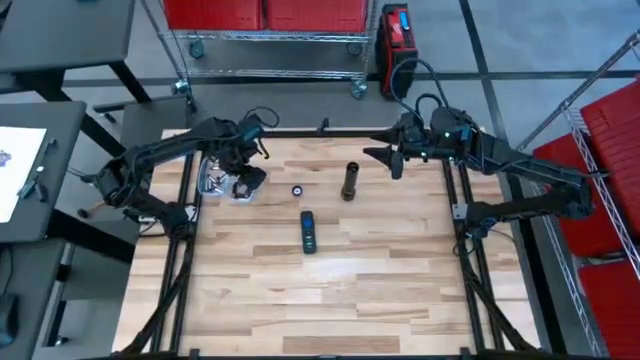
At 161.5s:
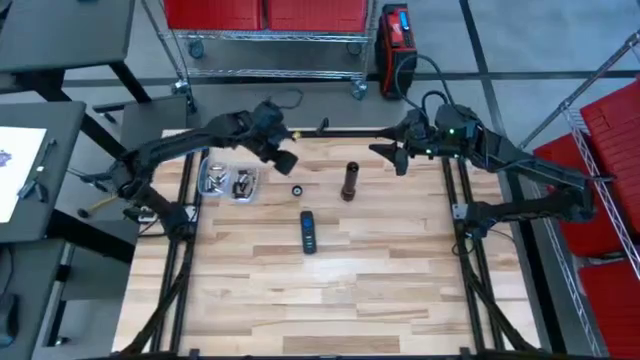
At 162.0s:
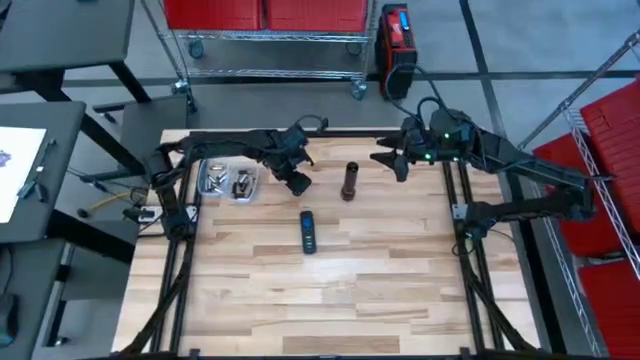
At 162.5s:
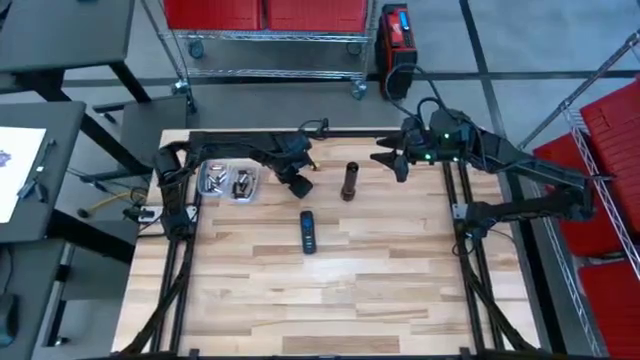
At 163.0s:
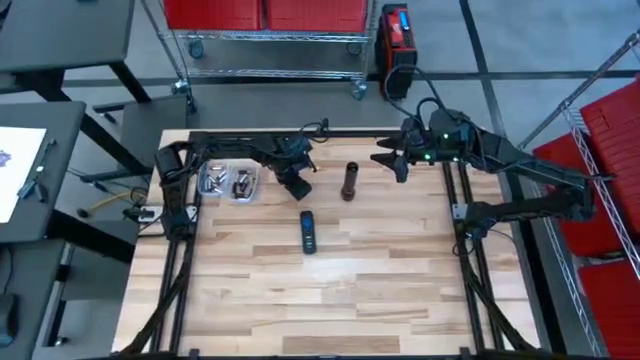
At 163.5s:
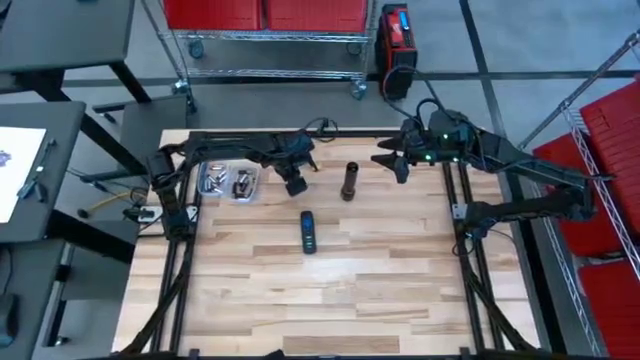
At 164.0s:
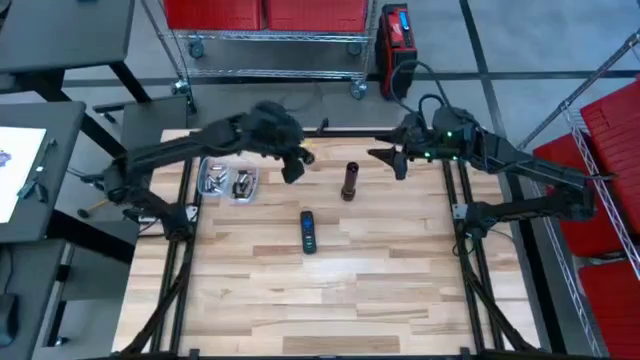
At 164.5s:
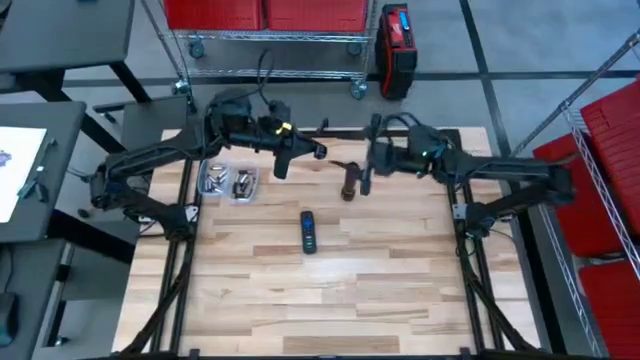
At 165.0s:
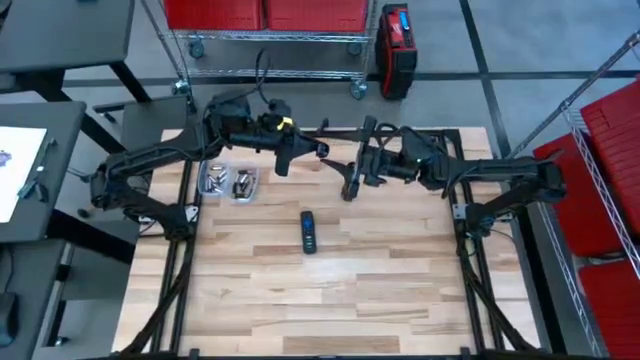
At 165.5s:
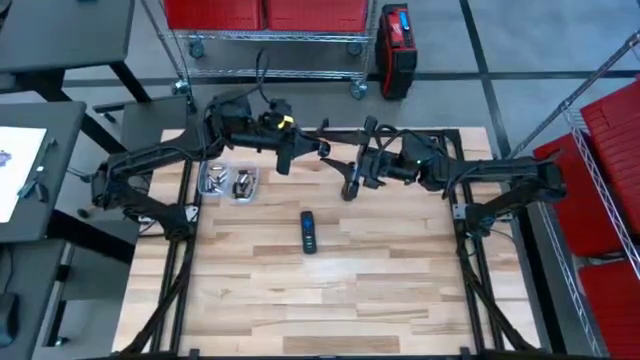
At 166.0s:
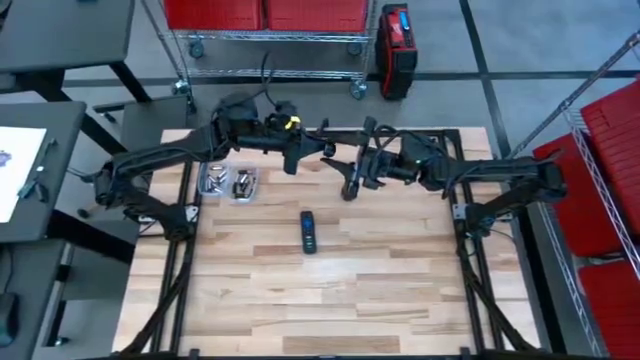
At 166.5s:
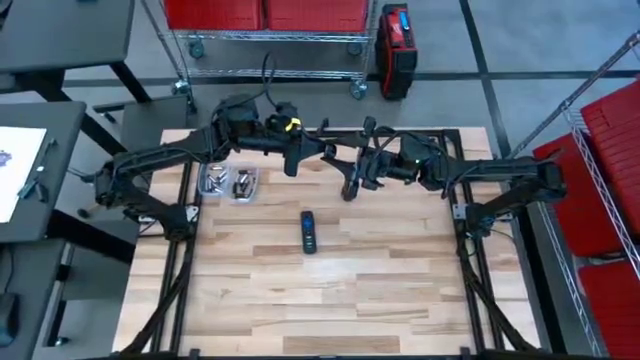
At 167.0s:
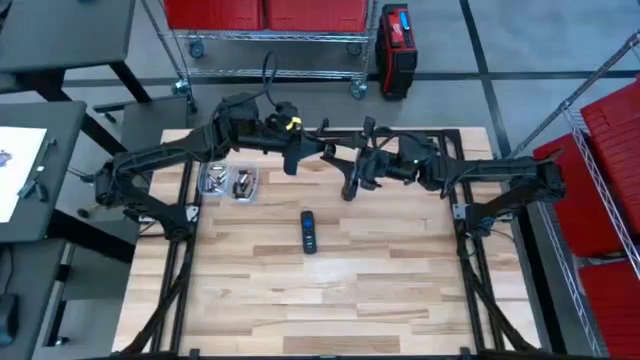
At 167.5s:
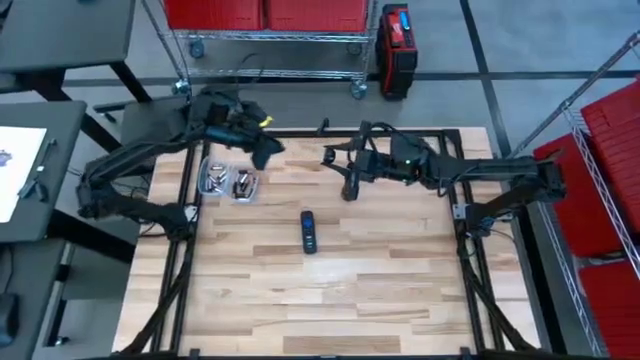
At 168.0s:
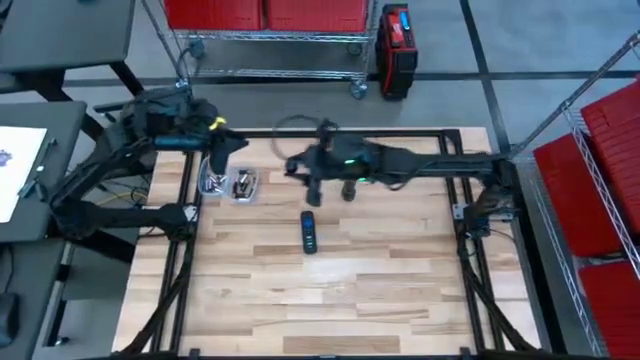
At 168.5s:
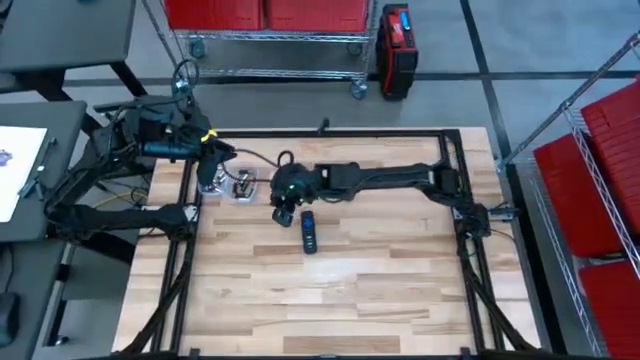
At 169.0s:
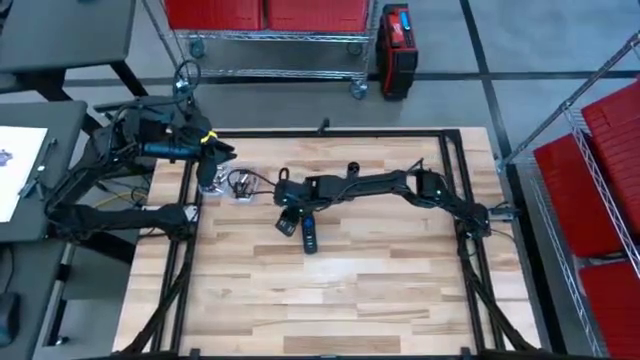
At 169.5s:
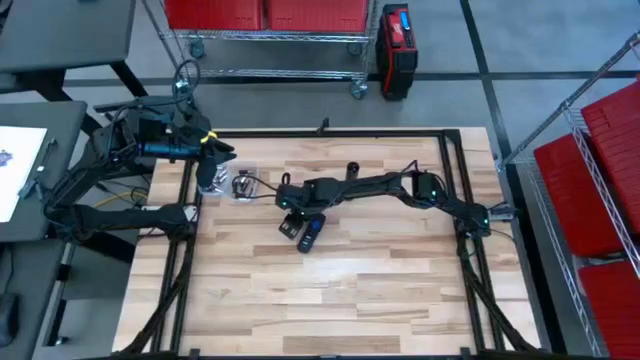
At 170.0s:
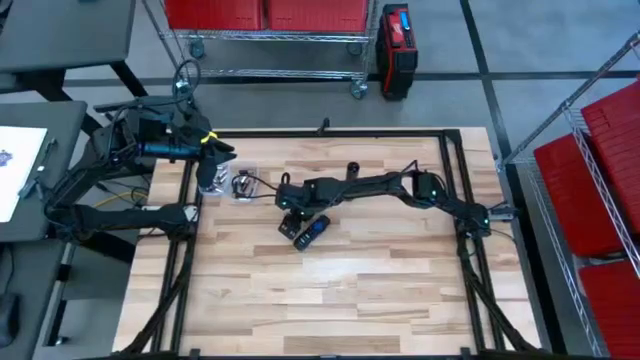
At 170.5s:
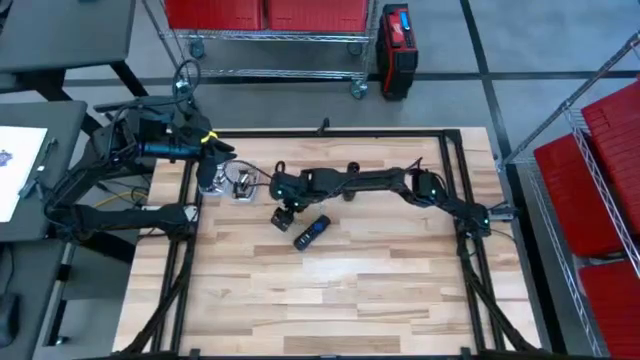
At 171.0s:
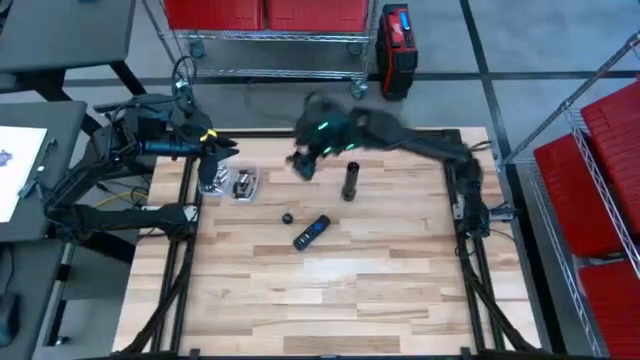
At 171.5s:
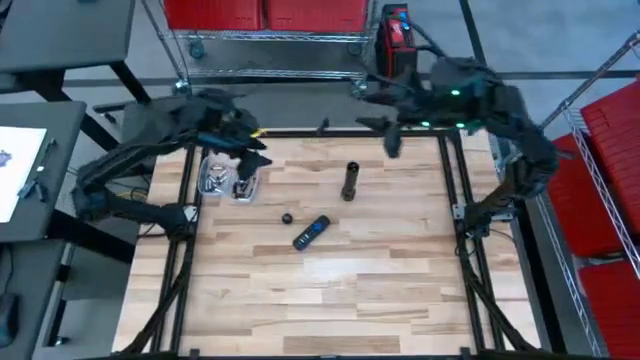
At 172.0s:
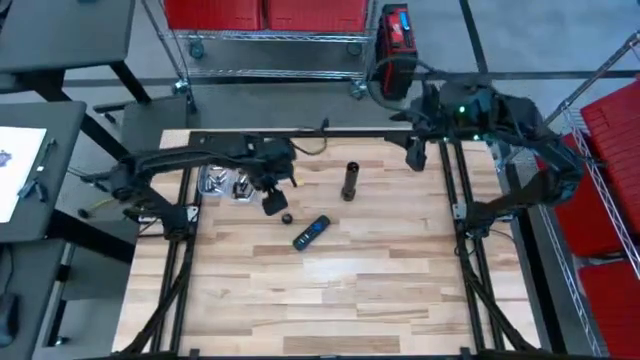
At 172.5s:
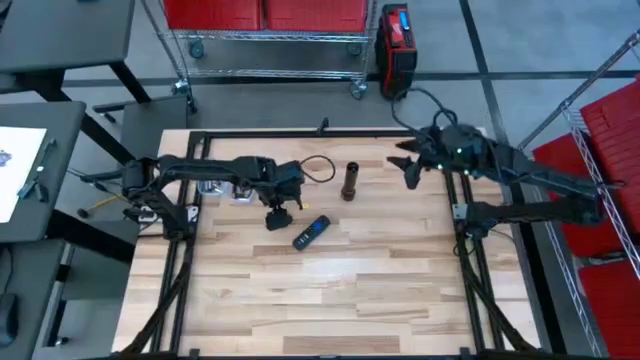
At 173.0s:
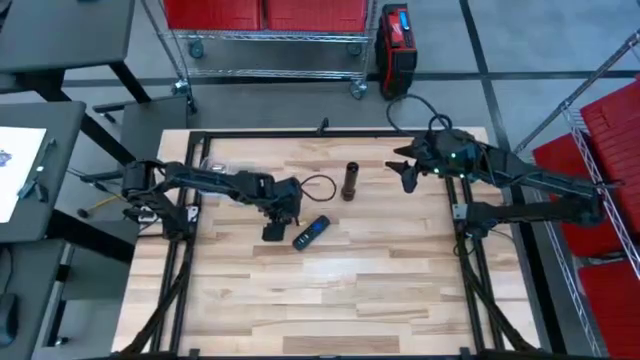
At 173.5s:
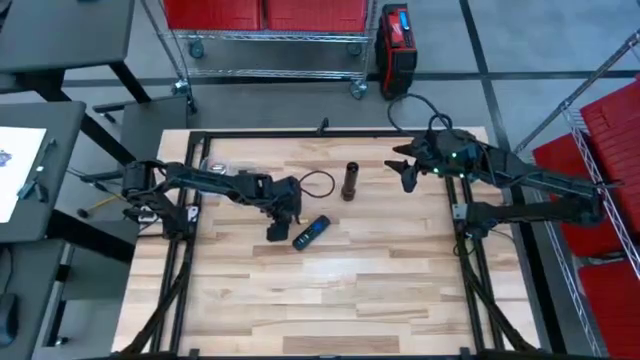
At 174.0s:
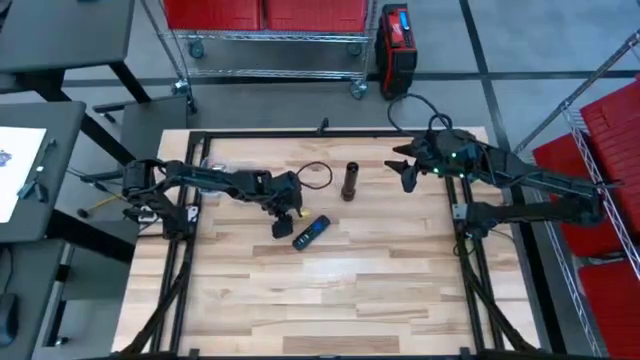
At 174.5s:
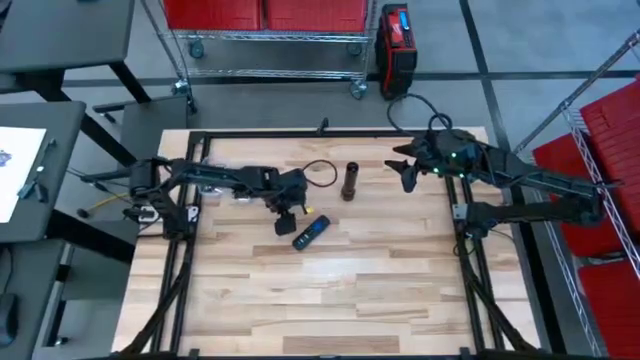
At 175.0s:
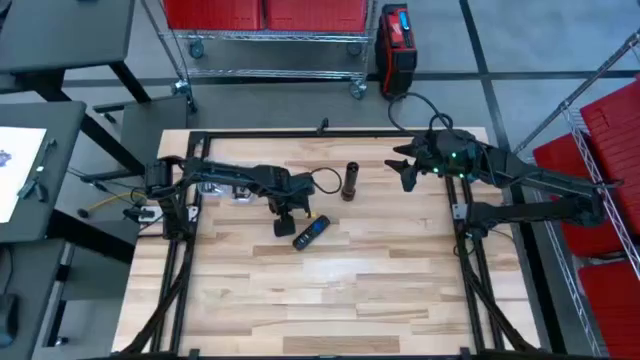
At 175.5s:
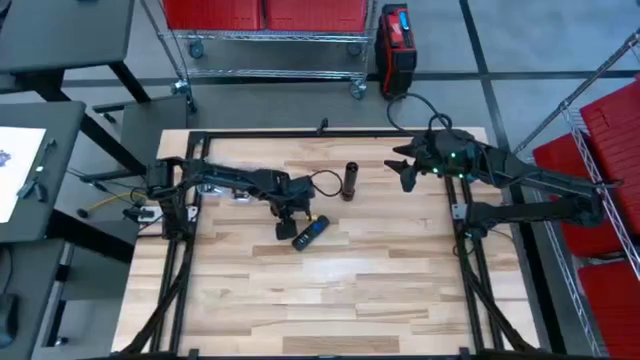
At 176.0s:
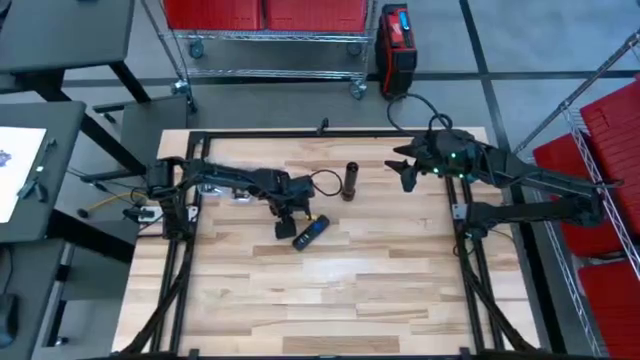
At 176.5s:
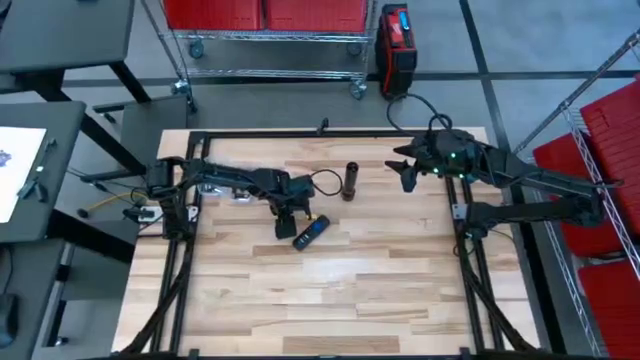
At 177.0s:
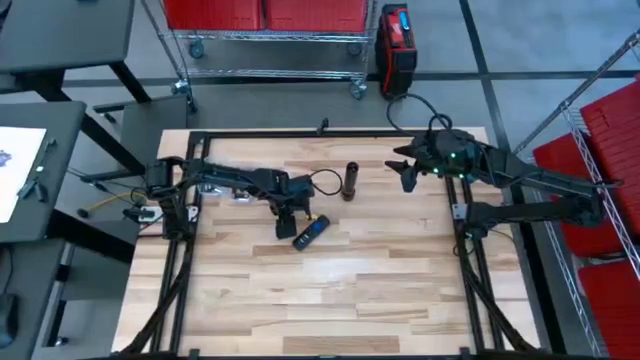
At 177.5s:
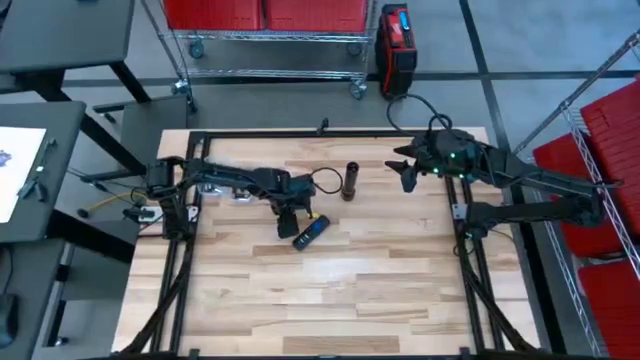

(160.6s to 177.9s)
Task: Insert battery
Close the flashlight's battery compartment

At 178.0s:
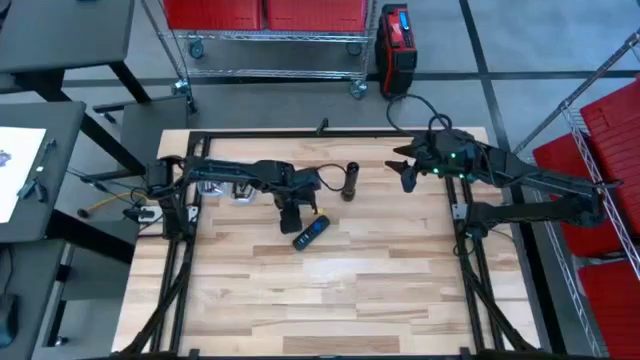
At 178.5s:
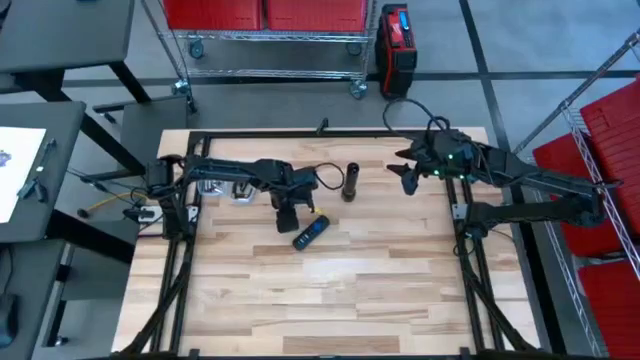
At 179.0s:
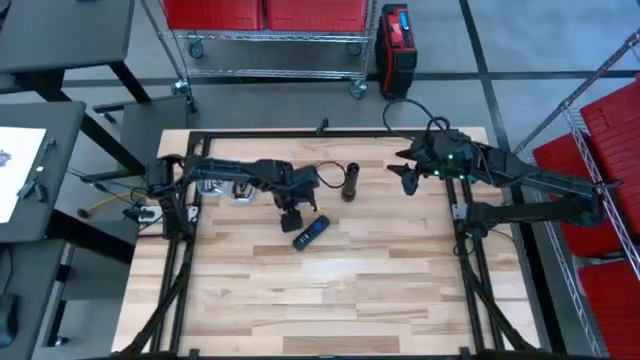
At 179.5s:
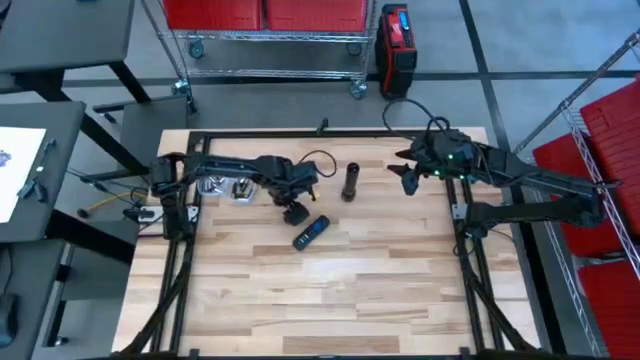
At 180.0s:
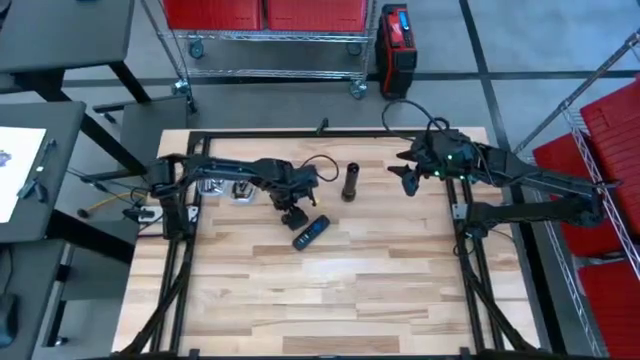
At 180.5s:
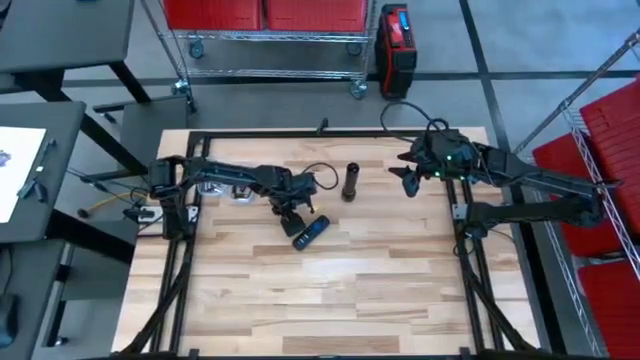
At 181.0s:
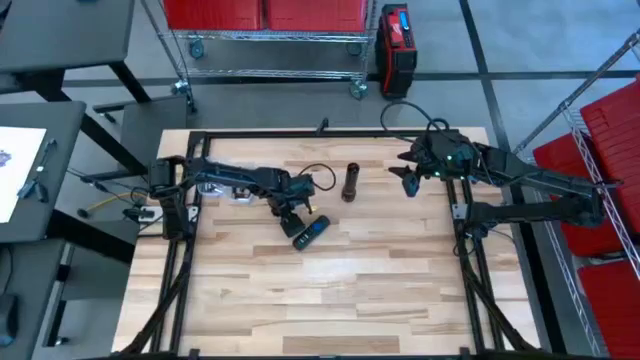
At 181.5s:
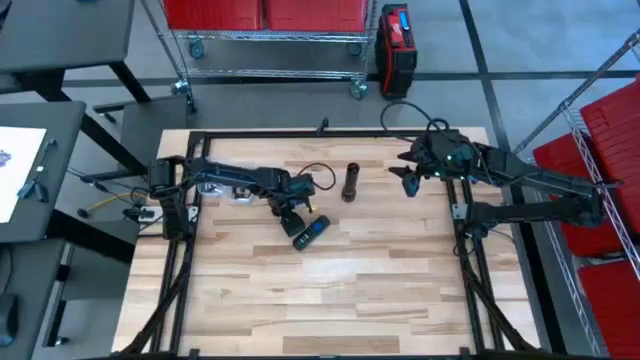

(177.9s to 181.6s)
Close the flashlight's battery compartment

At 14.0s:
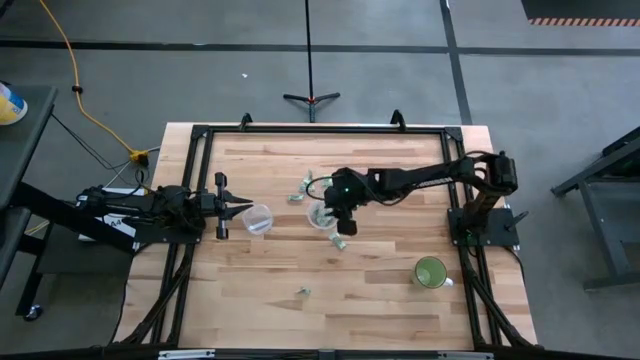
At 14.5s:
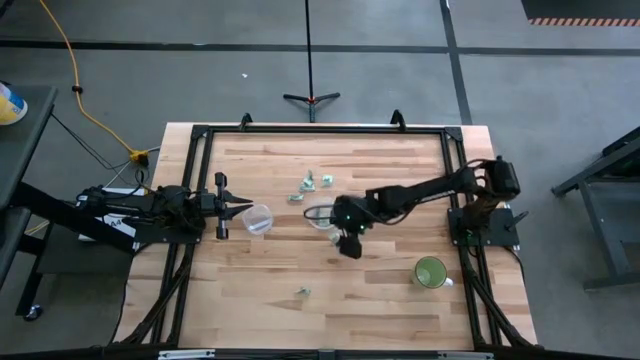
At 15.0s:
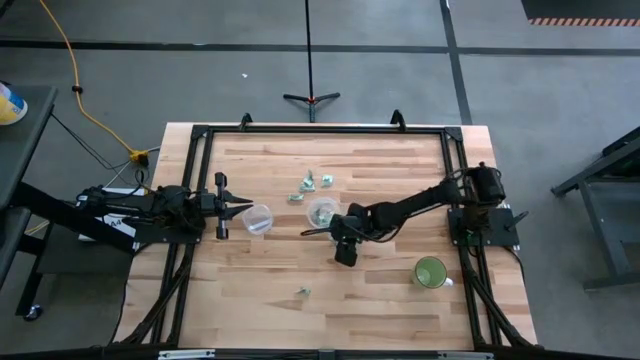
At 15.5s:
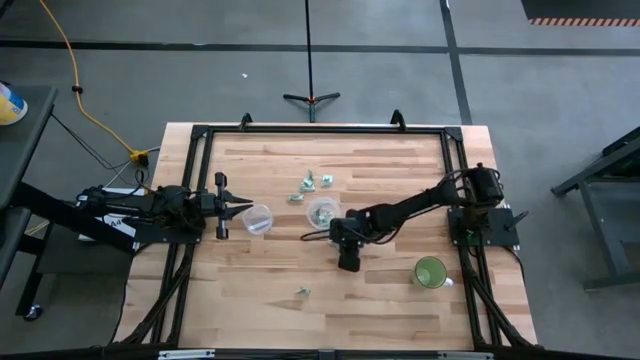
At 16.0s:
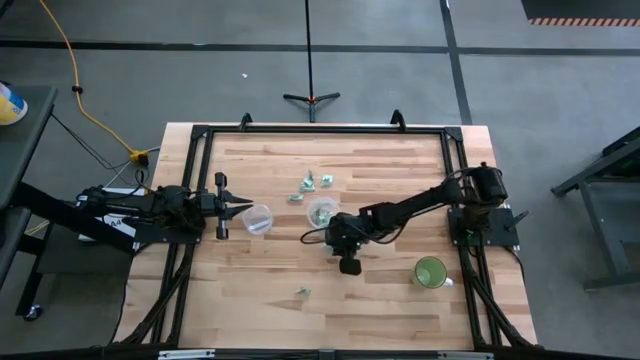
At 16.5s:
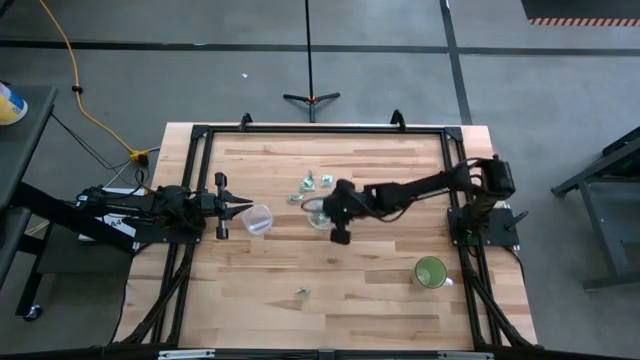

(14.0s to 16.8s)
Task: Pick and place Stevia / Truvia into bins
Put the white stevia packet into the right transparent container
